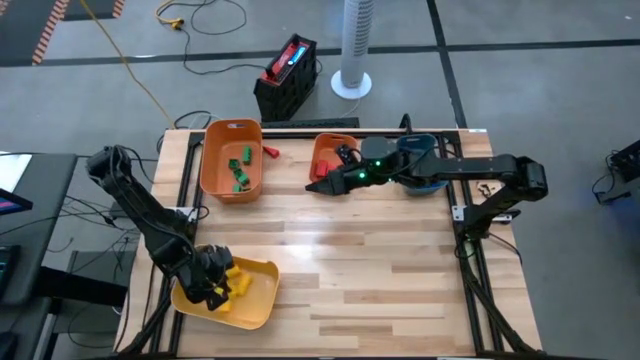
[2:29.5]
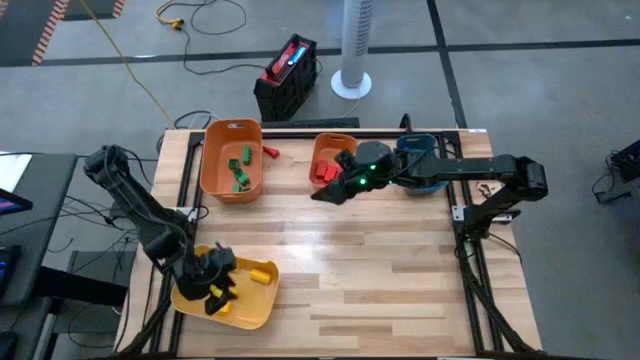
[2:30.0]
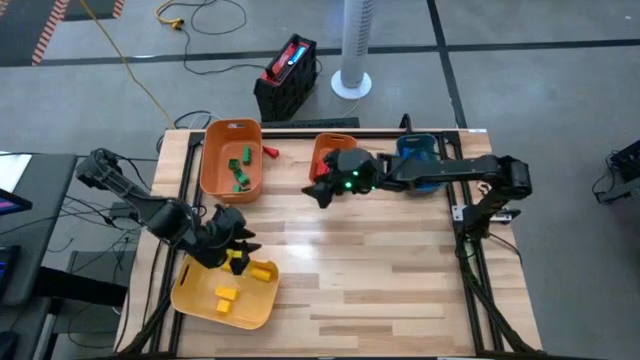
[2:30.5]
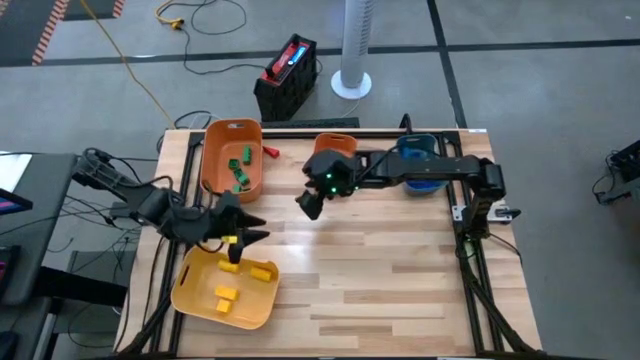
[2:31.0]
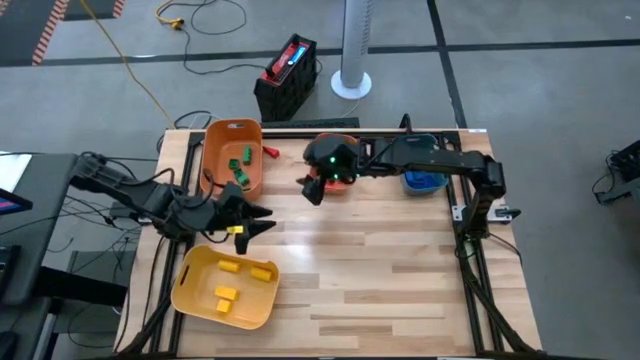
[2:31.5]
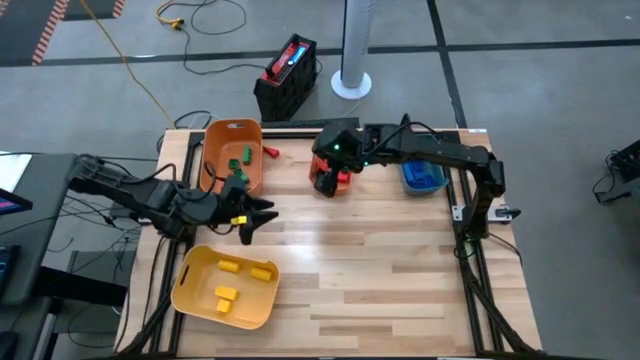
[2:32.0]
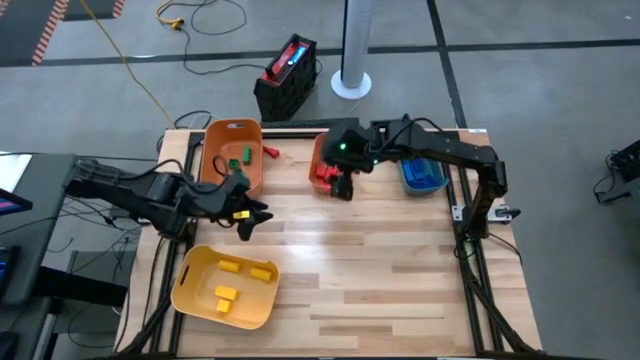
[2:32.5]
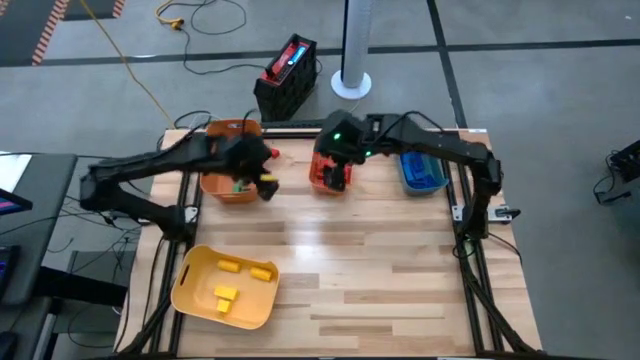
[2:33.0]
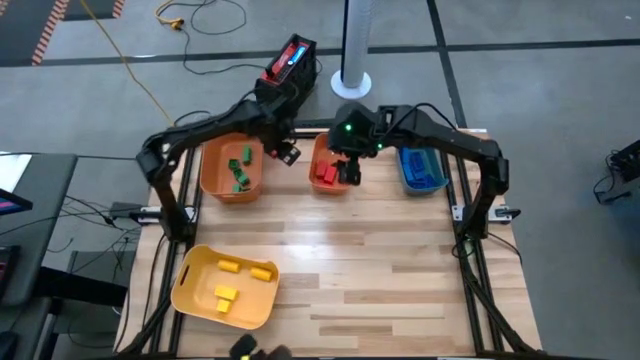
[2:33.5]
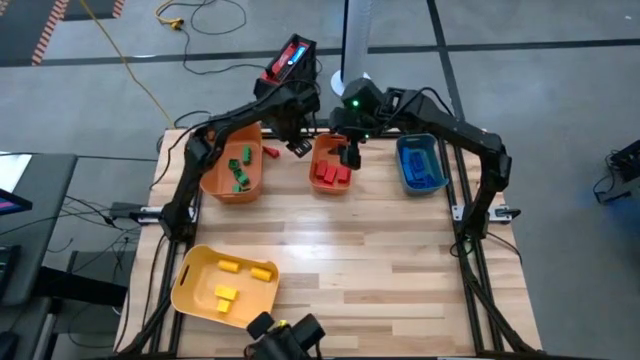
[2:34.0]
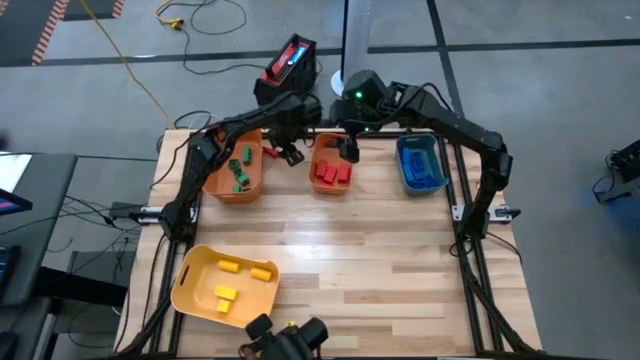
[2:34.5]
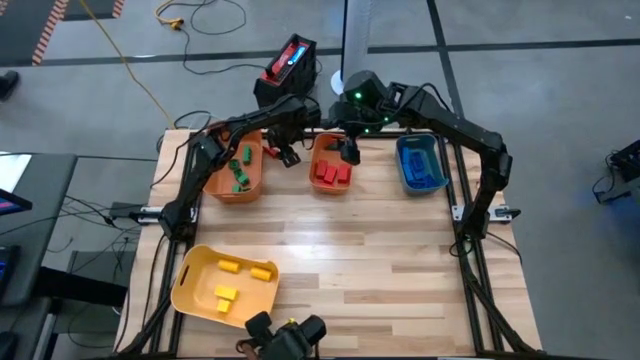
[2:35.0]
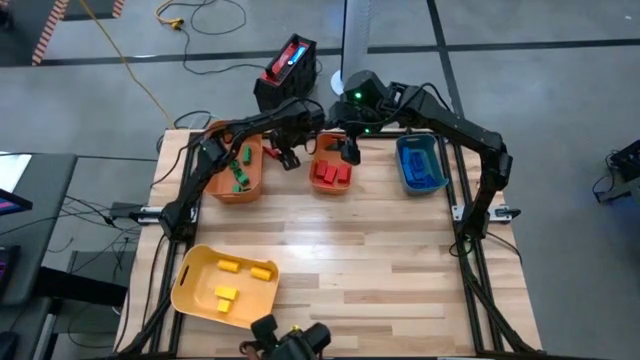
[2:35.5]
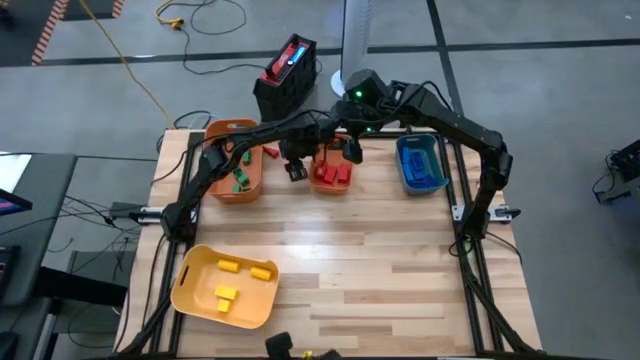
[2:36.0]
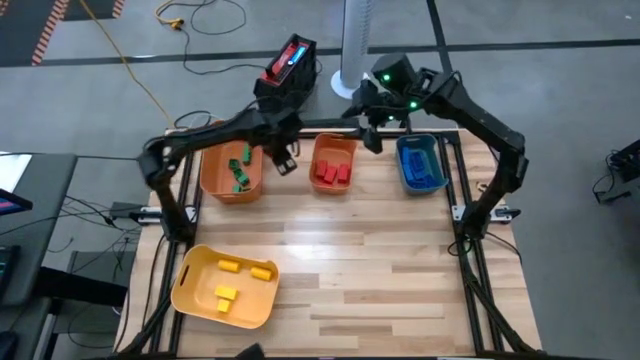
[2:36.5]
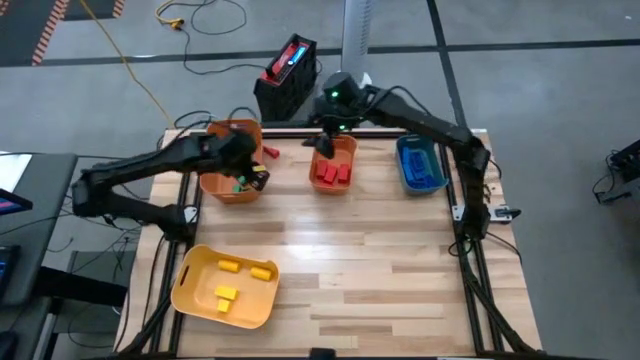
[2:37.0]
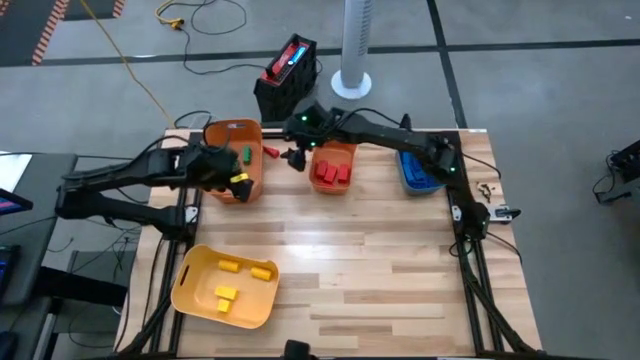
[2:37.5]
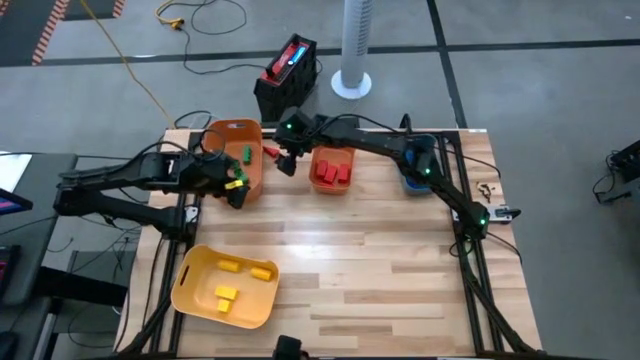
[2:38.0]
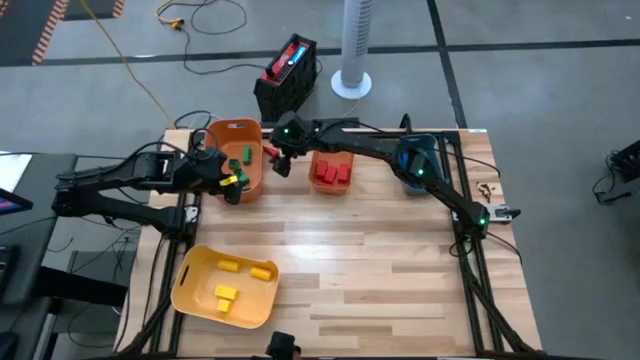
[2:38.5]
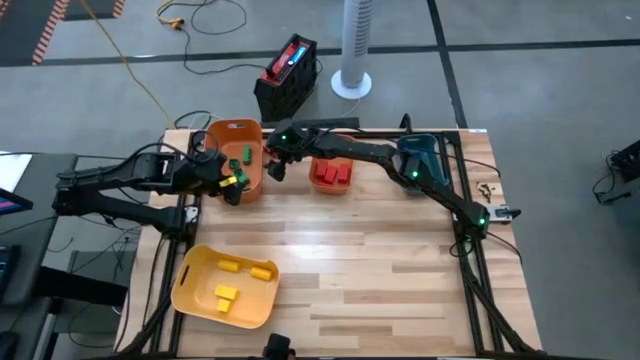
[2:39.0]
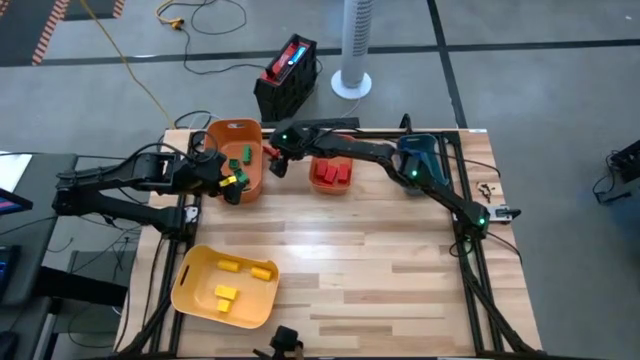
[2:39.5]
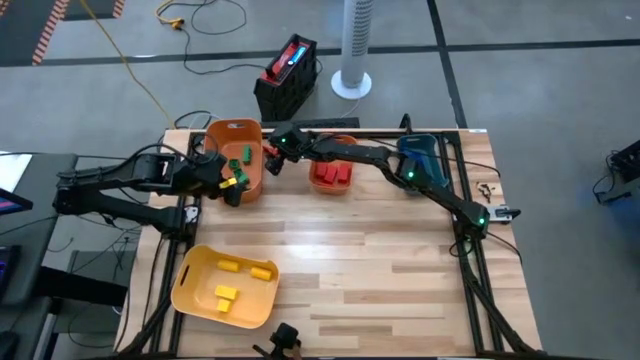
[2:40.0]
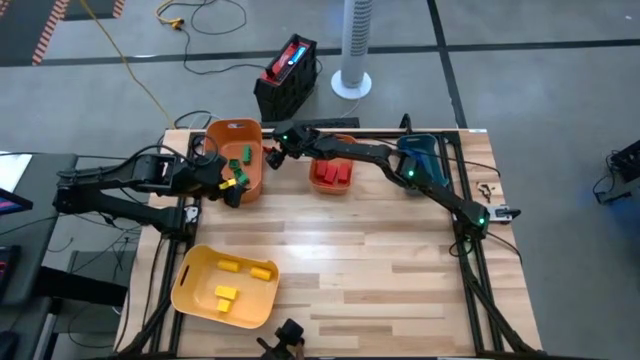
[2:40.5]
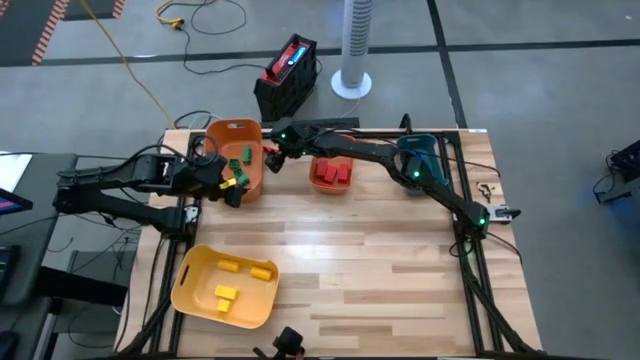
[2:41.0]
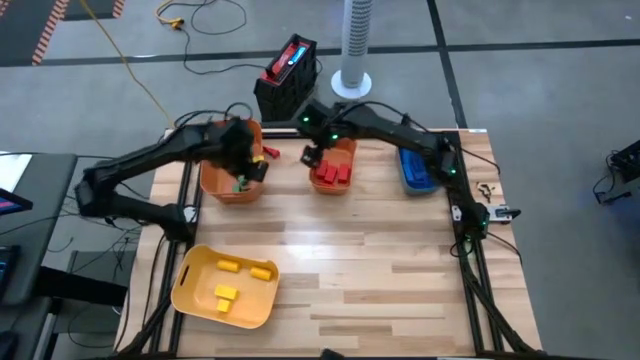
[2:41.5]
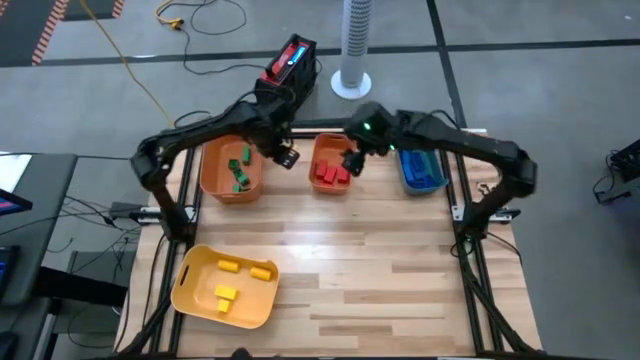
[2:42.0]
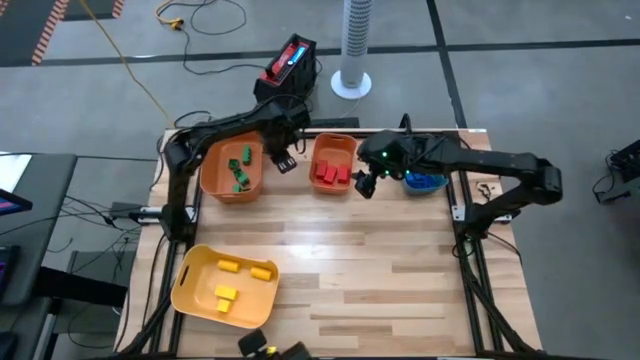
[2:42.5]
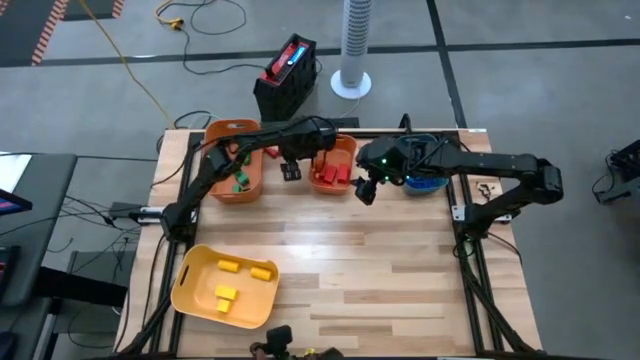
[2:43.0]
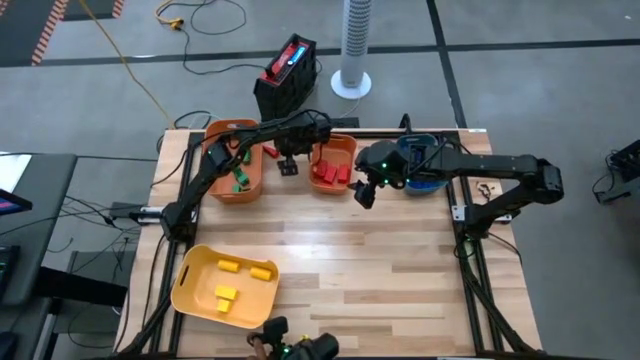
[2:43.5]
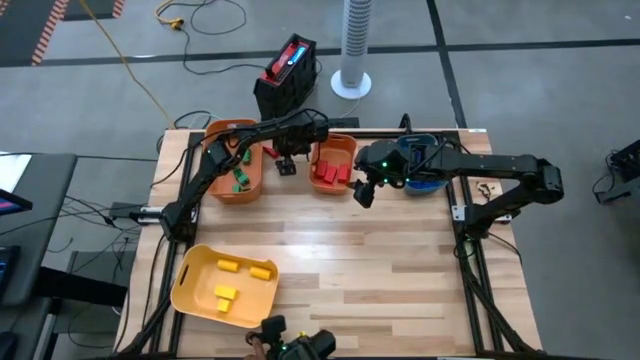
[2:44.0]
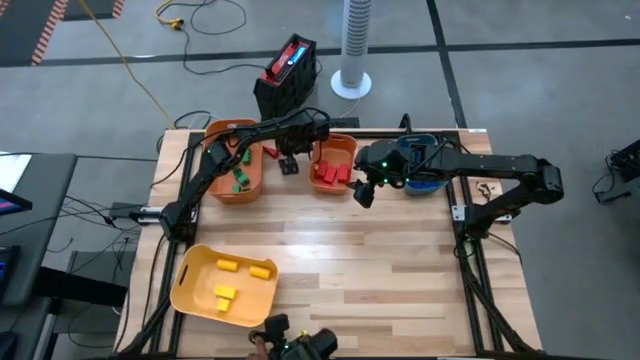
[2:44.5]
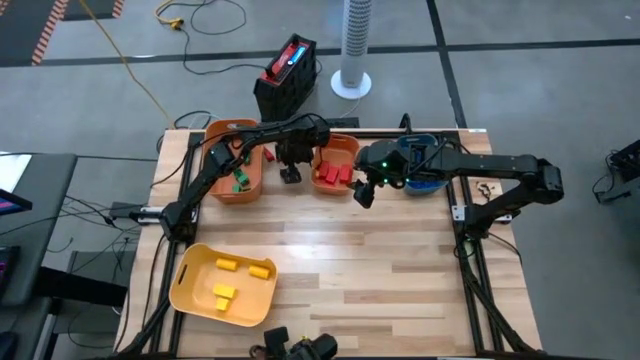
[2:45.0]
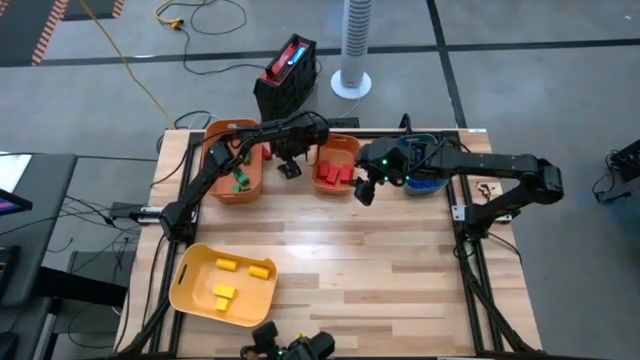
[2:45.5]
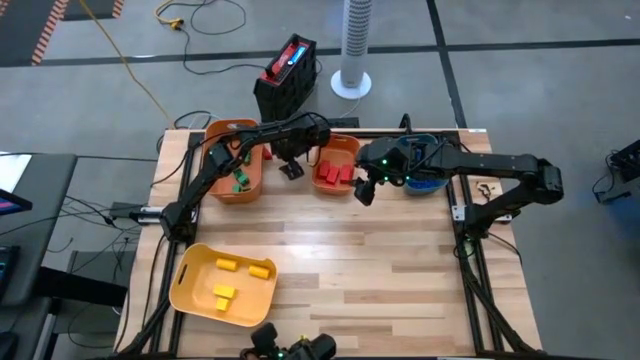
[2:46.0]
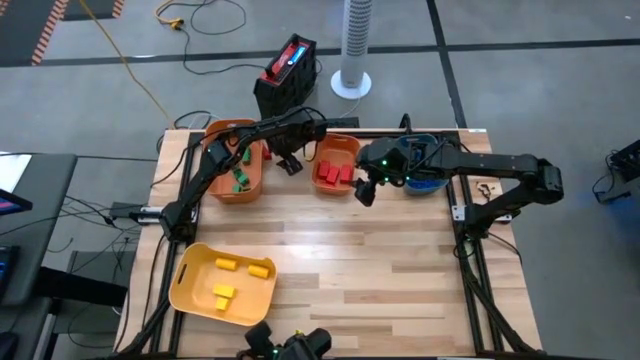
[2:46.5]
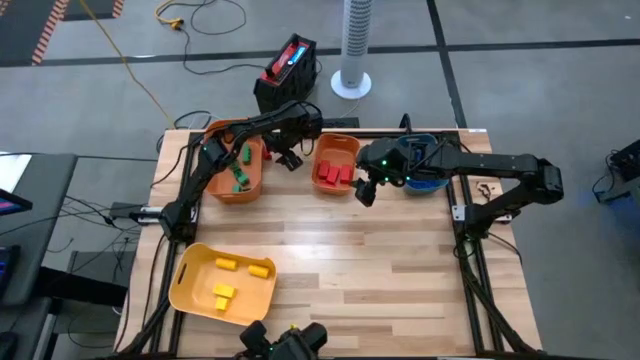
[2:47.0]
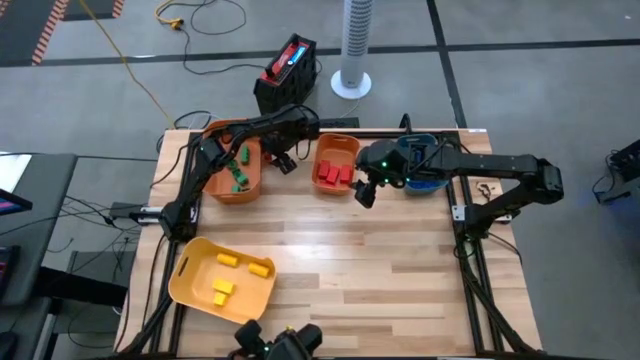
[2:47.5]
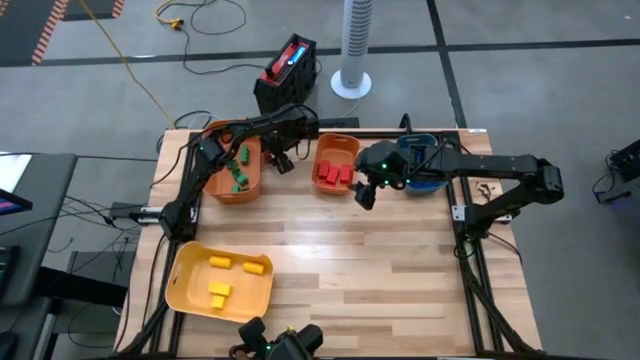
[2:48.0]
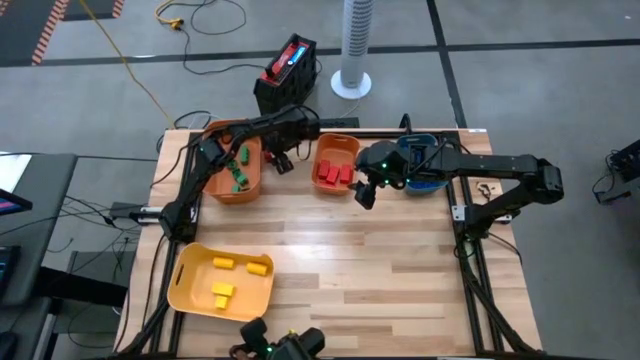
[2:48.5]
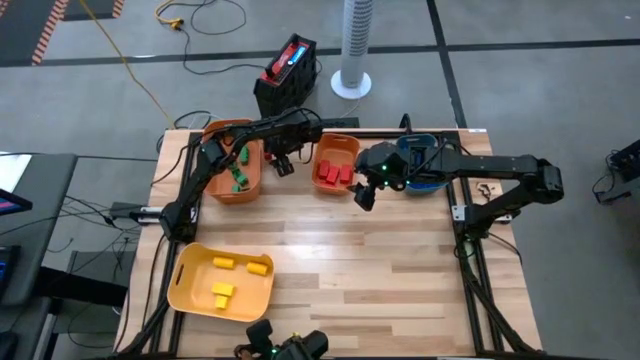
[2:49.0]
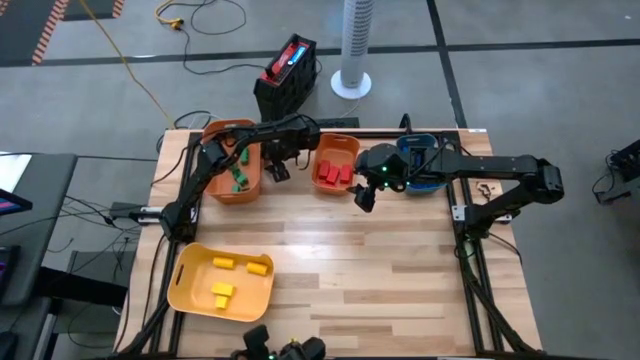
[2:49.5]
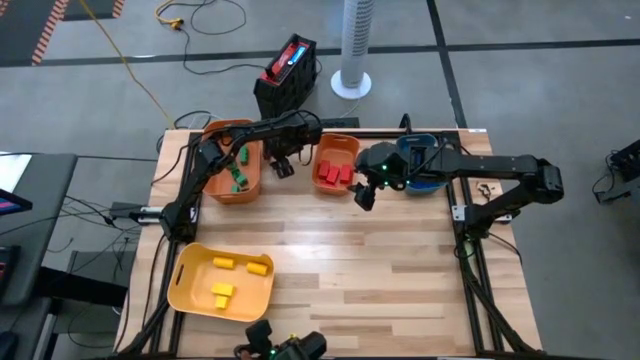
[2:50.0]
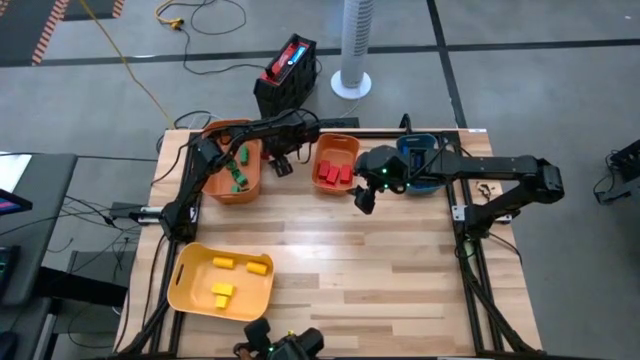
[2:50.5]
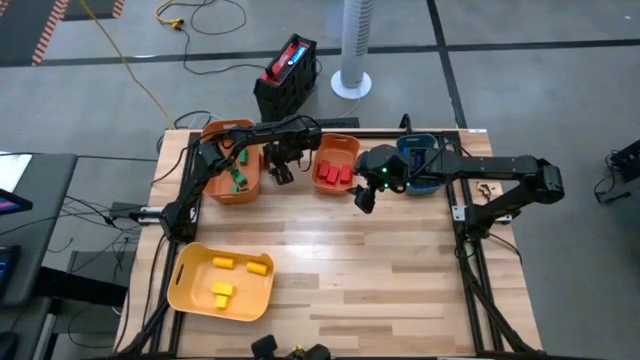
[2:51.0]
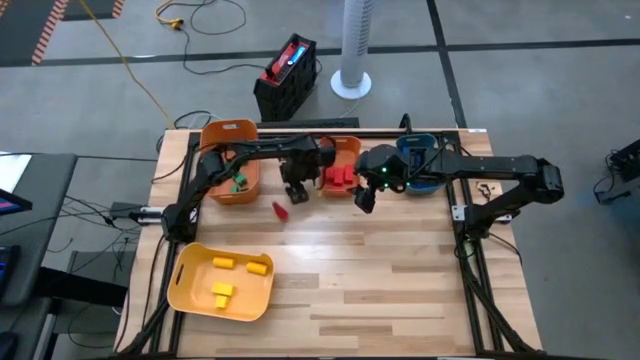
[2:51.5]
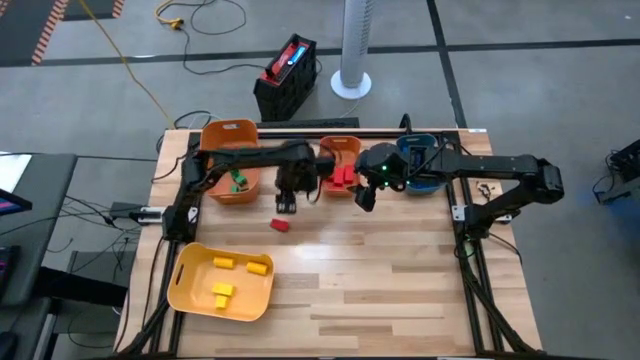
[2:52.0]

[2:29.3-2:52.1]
Task: Sort blocks
Move the red block
